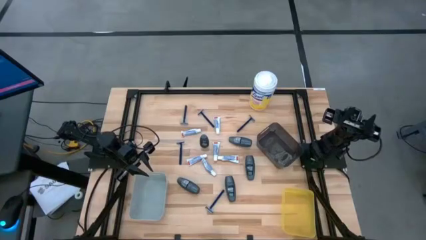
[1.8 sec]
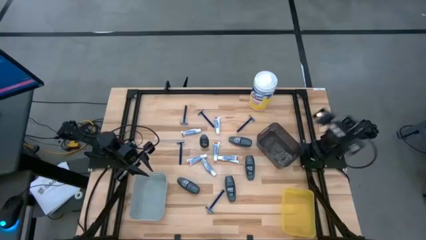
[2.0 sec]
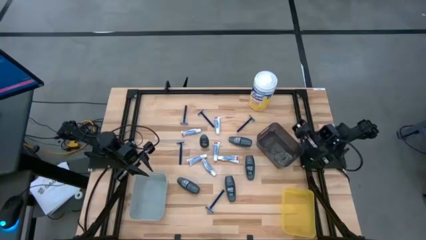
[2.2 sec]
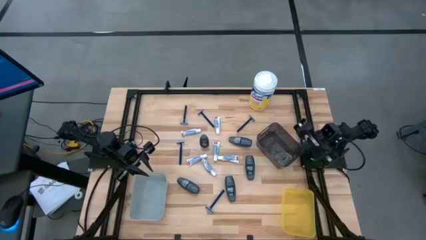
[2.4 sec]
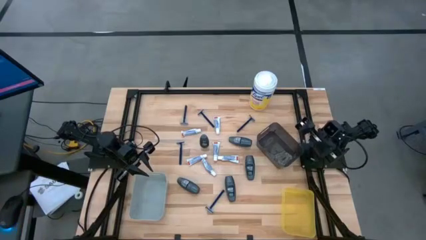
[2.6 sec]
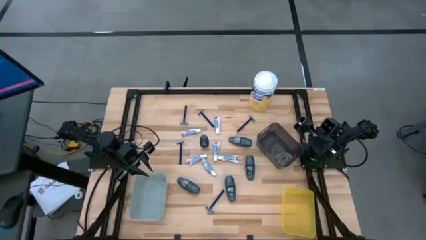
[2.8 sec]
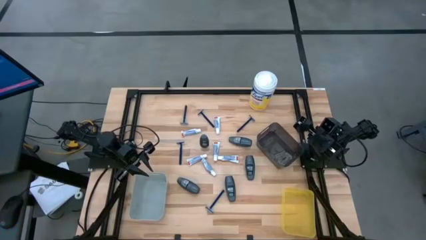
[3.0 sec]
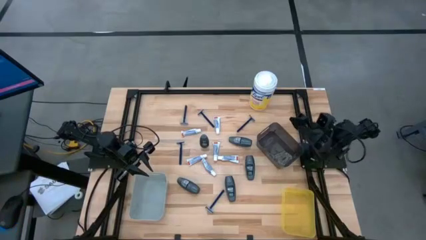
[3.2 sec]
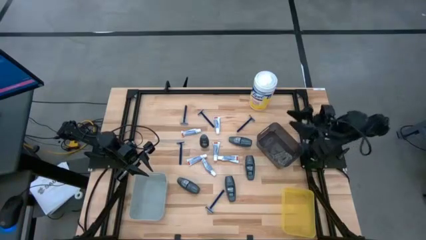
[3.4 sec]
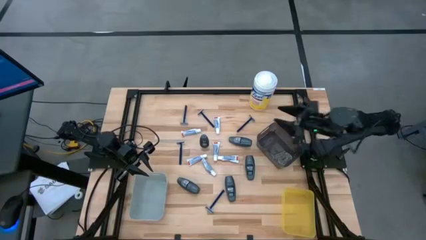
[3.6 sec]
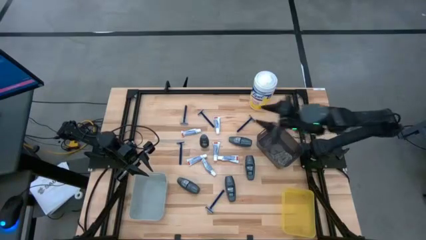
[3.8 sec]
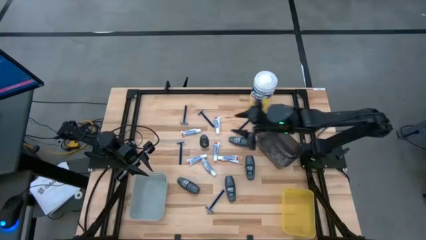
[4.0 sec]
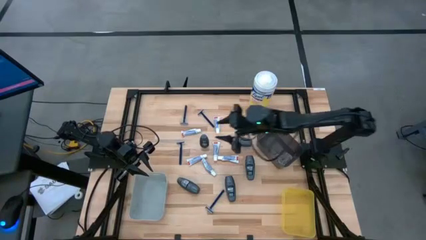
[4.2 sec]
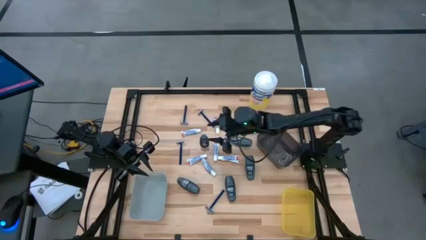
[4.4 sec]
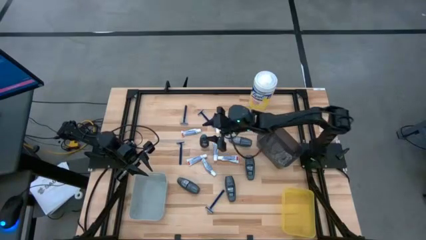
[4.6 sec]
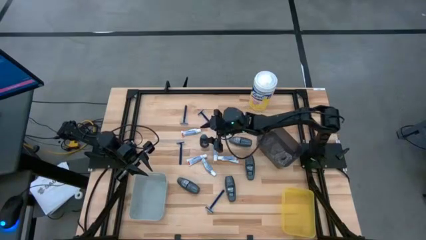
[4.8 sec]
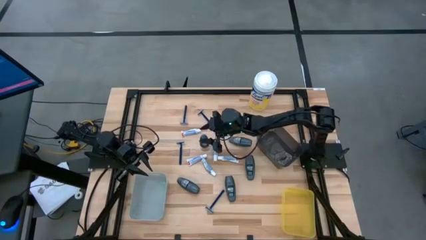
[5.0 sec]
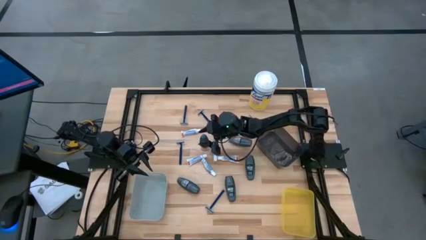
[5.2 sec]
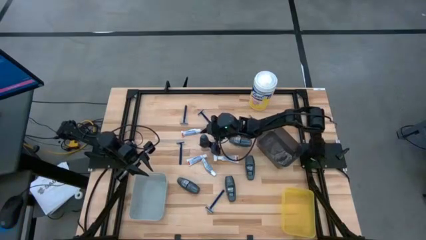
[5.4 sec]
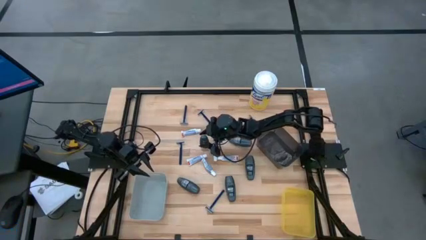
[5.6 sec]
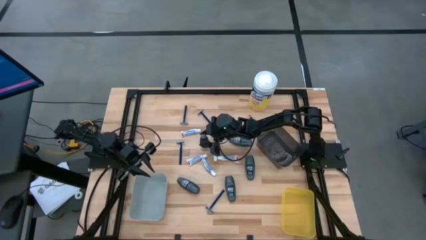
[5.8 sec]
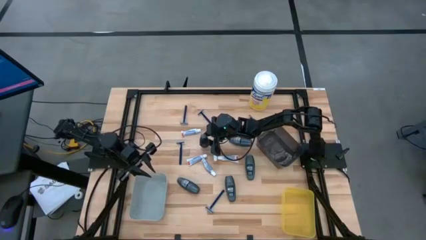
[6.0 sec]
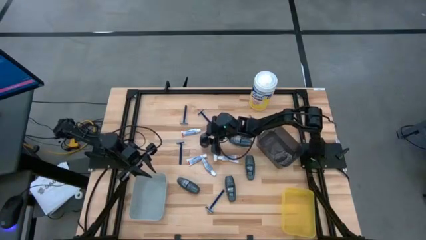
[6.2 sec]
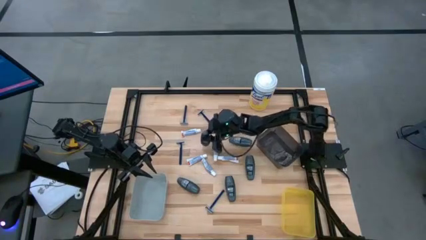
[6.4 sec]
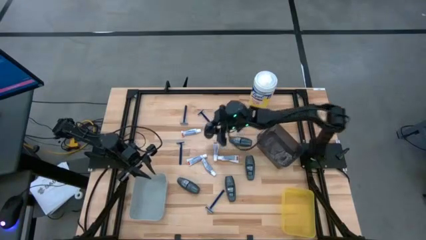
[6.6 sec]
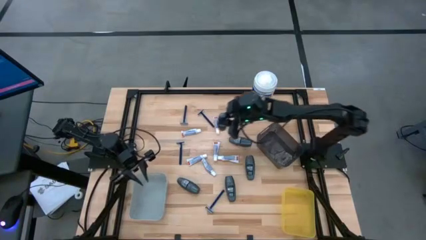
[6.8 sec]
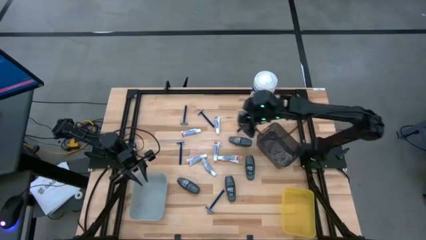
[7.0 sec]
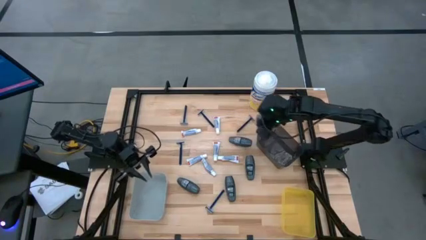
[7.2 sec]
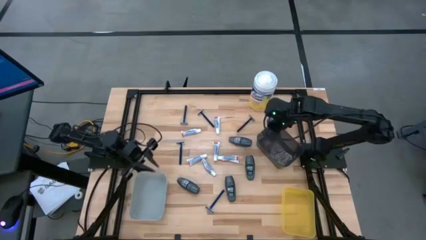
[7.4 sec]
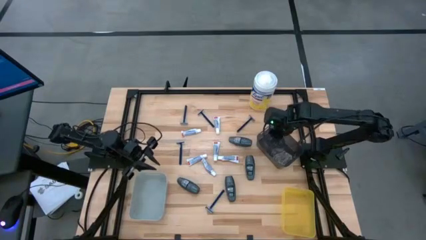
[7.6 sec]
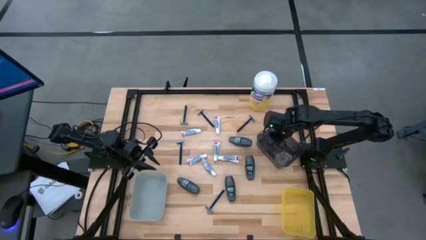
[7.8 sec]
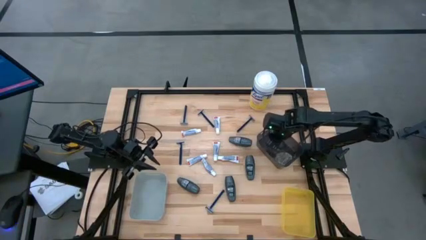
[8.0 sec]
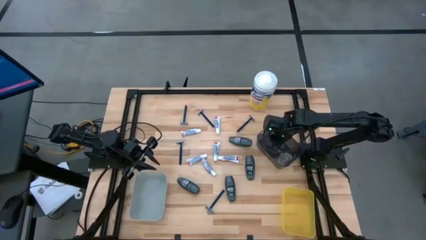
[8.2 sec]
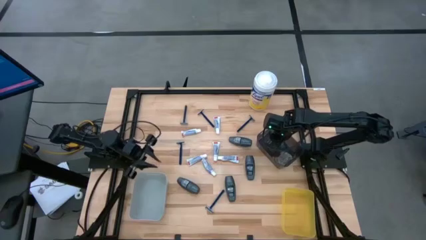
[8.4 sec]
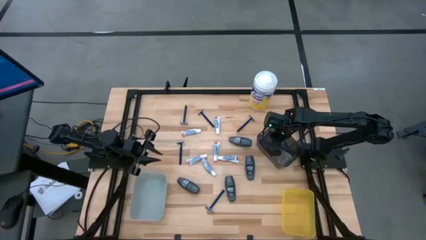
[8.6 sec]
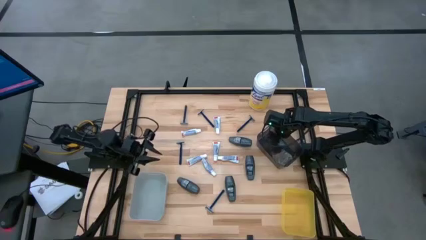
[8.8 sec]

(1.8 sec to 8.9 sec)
Task: Pick & Place Travel size toiletries
Put the gray deodorant into the black bin

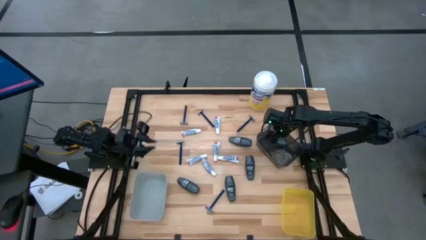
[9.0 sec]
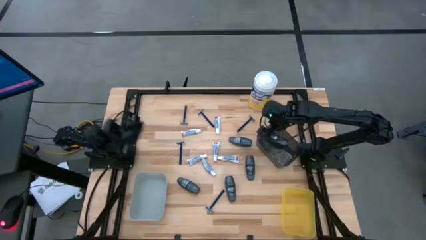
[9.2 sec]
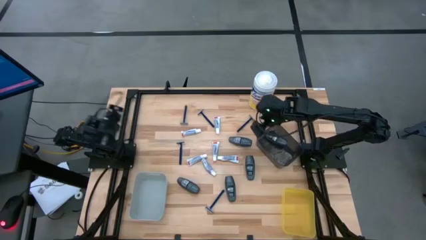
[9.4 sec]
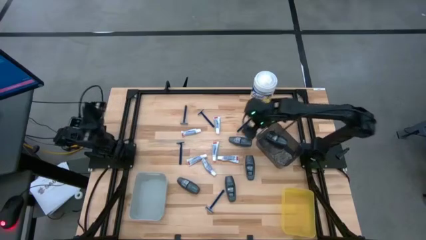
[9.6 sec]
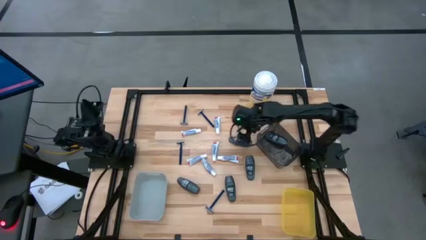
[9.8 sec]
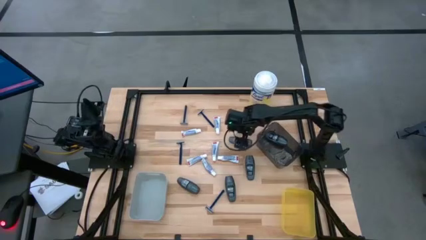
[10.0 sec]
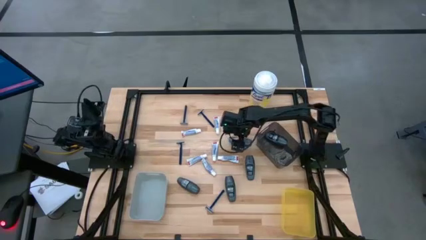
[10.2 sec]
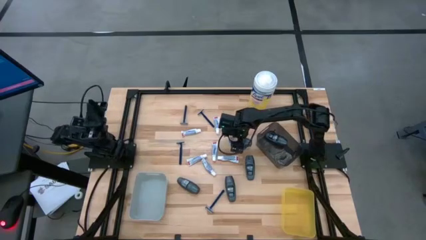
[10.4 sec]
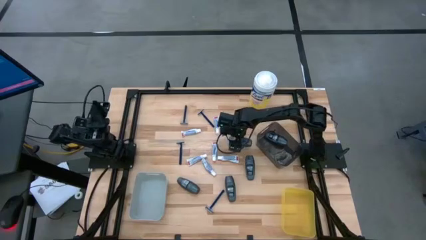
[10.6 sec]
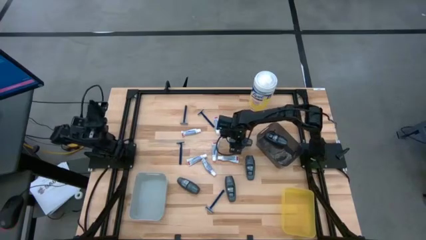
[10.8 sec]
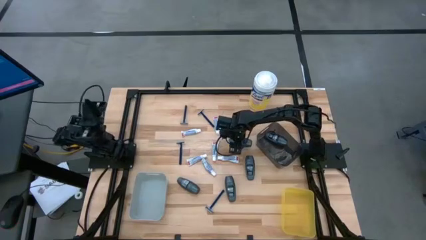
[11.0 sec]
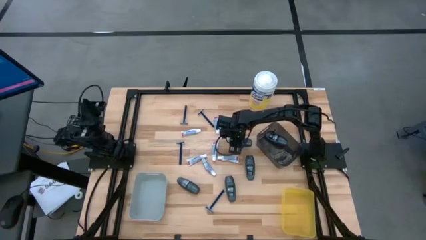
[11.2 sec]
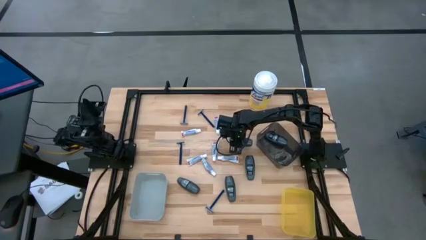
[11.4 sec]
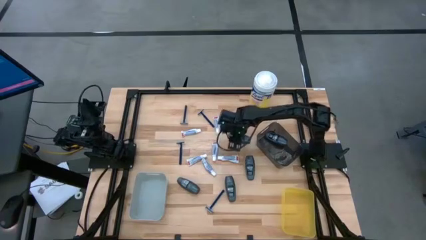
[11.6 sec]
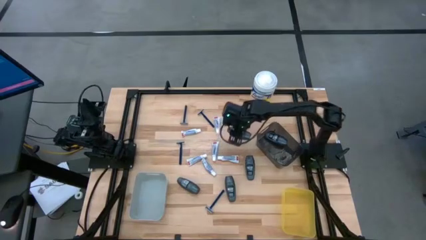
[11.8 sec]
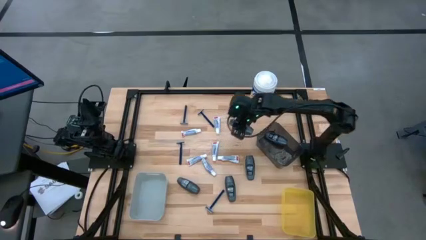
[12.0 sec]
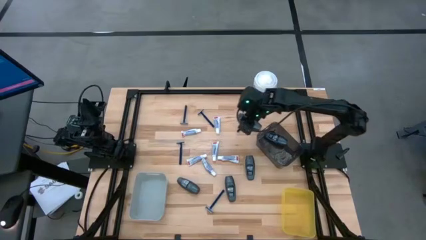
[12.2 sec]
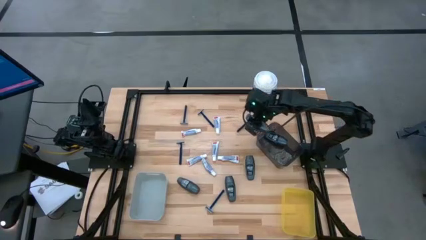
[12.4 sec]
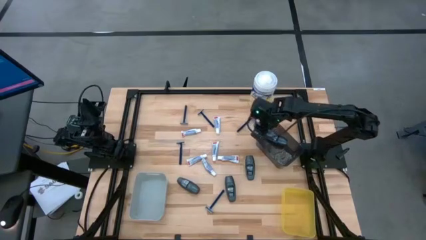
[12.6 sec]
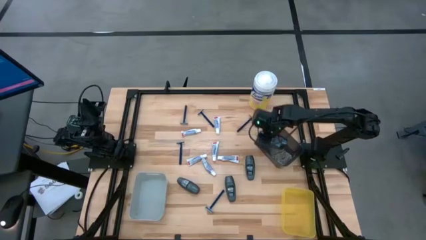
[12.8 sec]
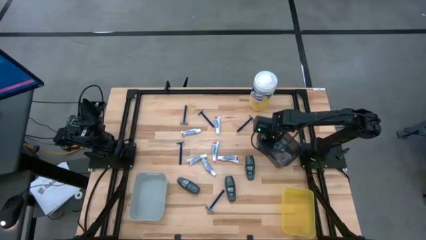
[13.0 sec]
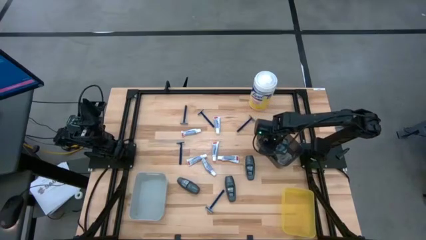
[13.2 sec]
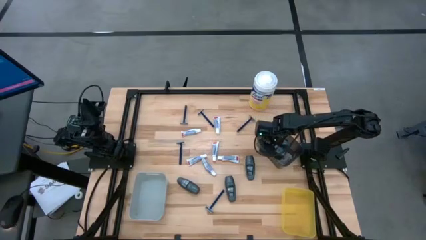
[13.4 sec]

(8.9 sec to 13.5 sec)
Put the gray deodorant into the black bin

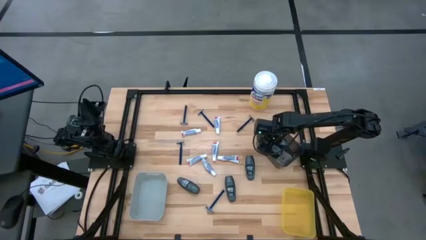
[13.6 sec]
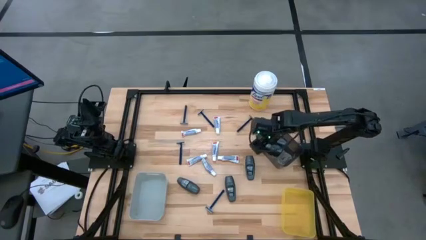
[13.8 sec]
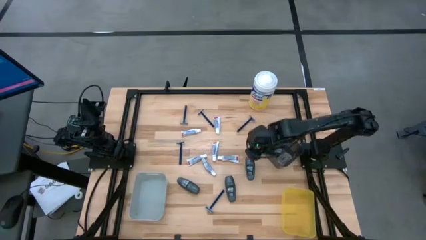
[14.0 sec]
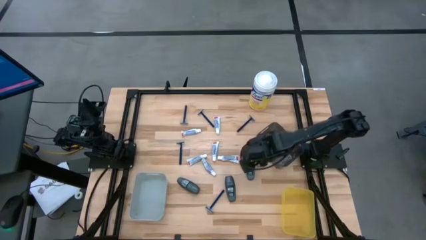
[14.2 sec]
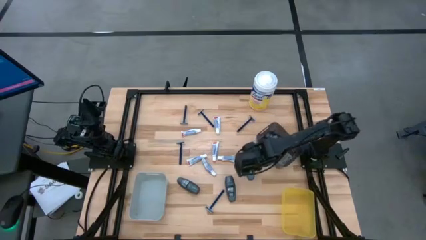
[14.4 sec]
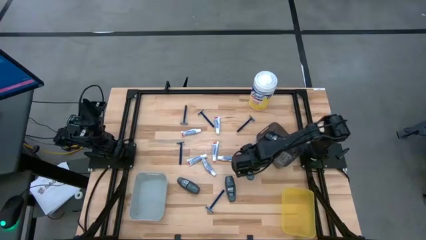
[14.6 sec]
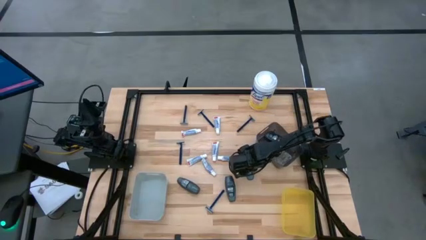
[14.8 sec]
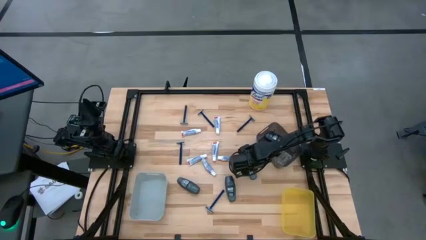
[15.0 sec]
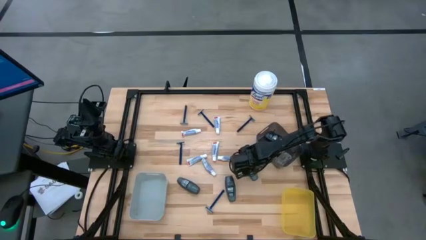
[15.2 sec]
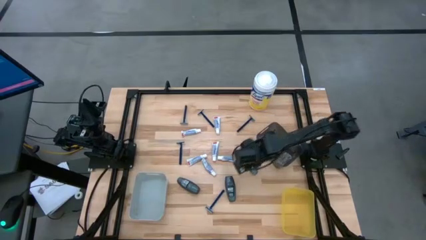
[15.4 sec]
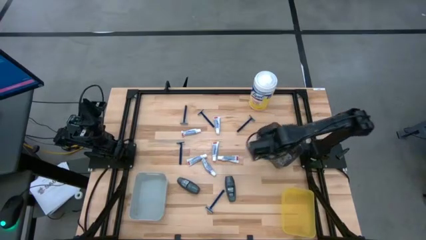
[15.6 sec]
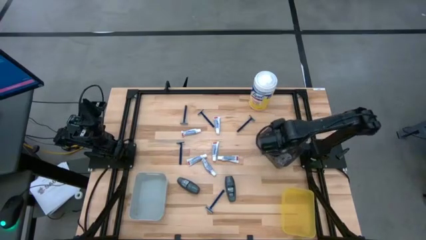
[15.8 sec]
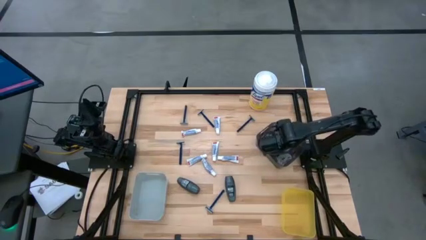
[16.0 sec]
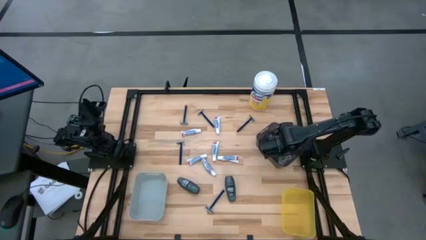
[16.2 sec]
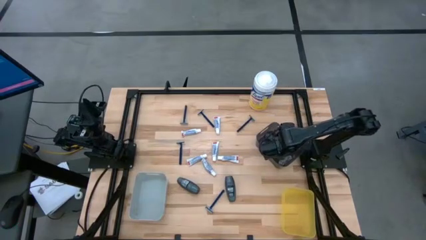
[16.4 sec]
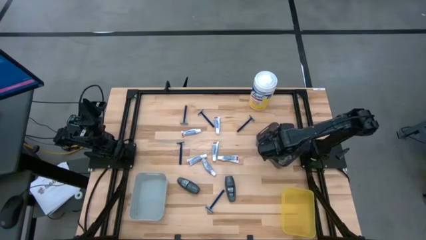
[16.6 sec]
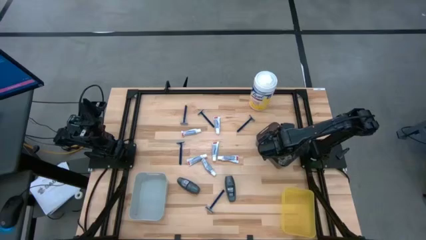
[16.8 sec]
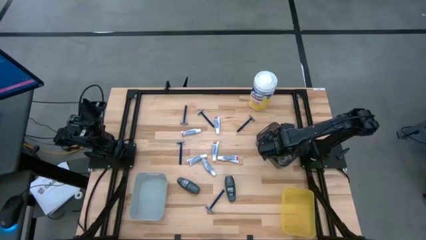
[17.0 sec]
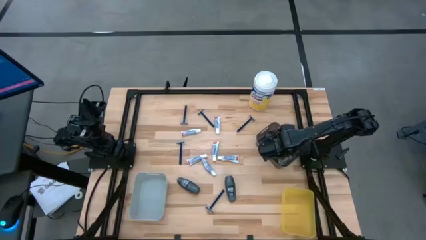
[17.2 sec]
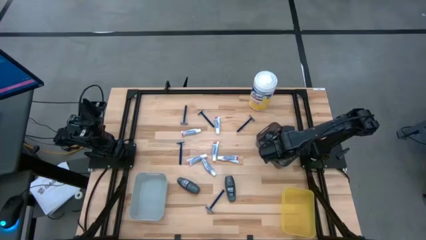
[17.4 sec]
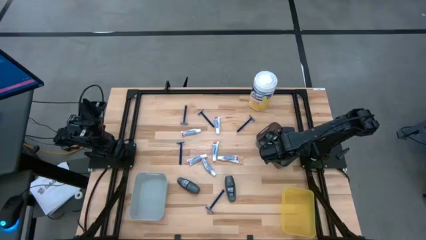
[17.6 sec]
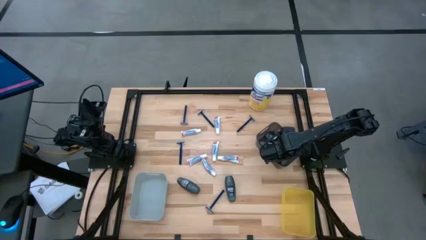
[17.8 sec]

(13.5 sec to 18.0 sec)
Put the gray deodorant into the black bin
